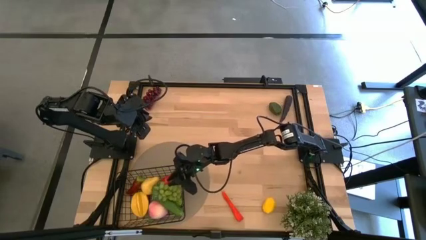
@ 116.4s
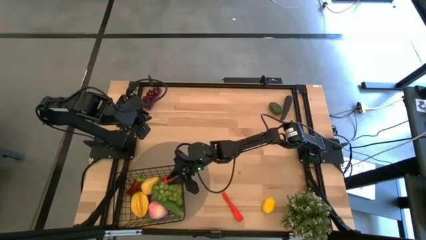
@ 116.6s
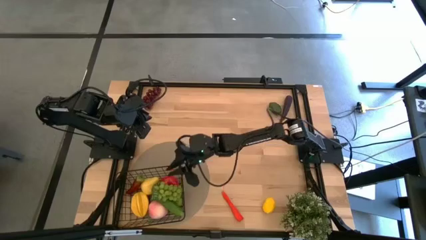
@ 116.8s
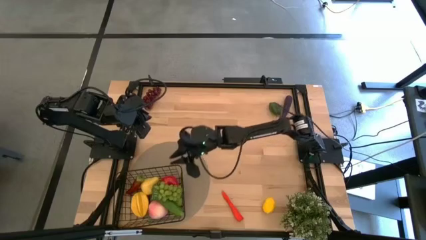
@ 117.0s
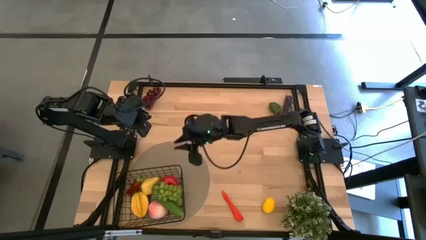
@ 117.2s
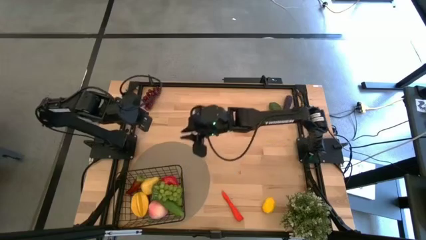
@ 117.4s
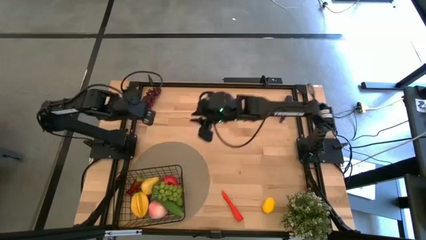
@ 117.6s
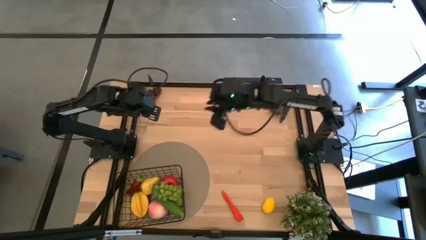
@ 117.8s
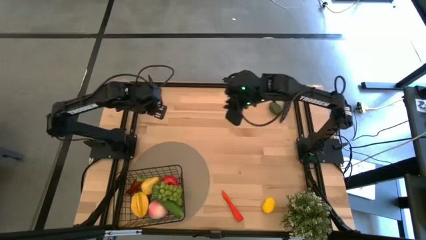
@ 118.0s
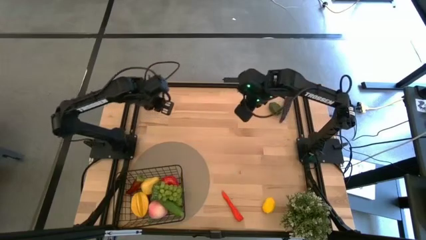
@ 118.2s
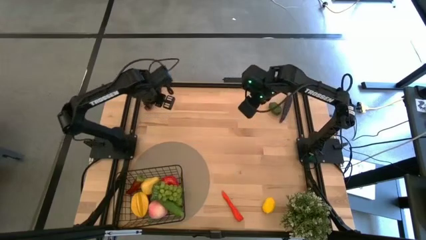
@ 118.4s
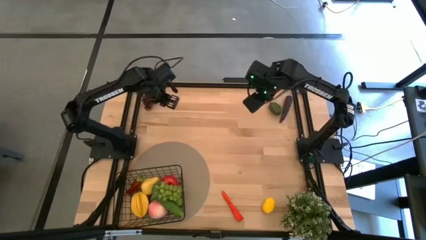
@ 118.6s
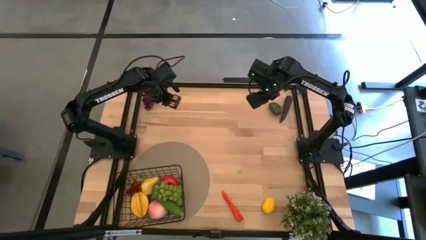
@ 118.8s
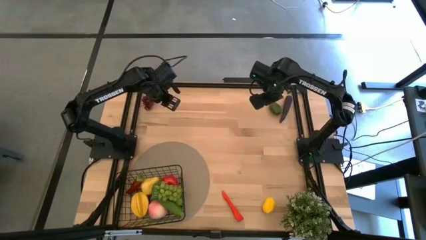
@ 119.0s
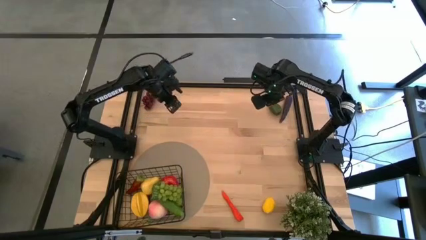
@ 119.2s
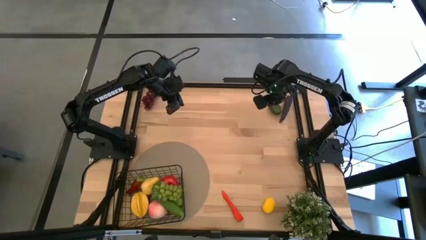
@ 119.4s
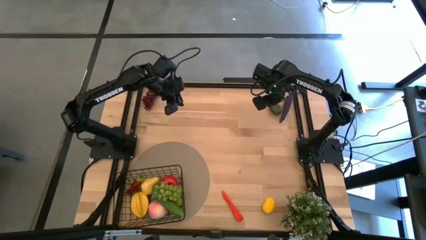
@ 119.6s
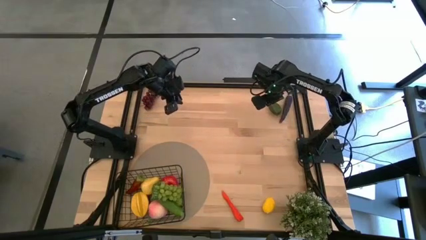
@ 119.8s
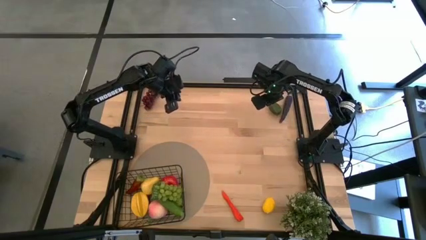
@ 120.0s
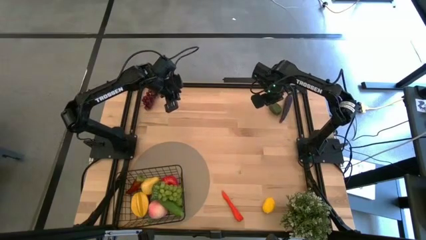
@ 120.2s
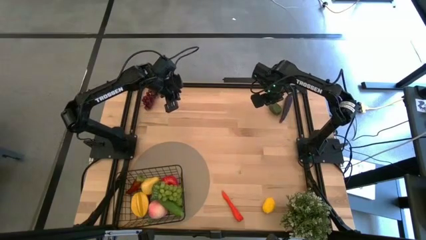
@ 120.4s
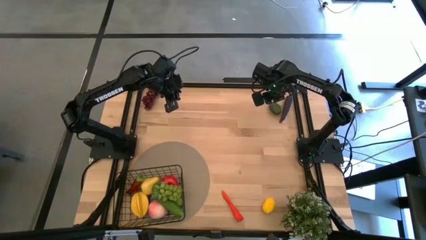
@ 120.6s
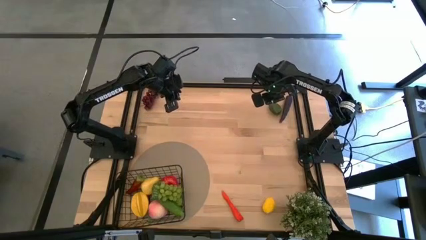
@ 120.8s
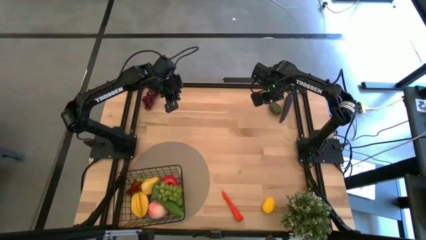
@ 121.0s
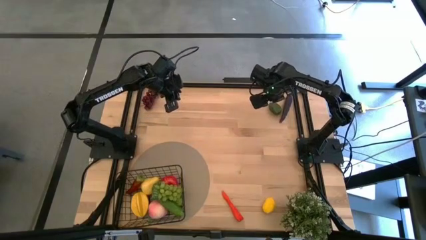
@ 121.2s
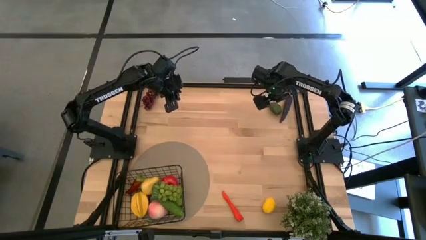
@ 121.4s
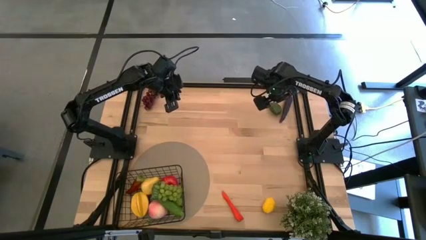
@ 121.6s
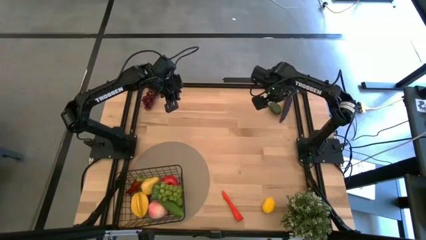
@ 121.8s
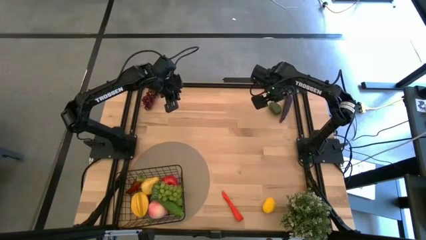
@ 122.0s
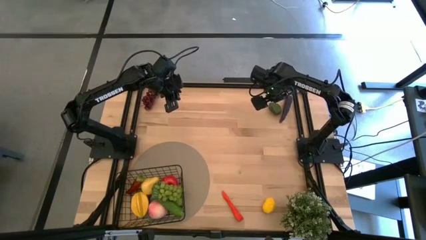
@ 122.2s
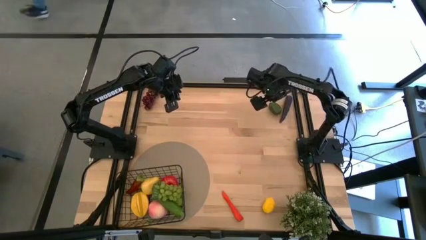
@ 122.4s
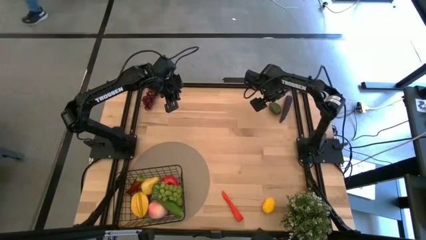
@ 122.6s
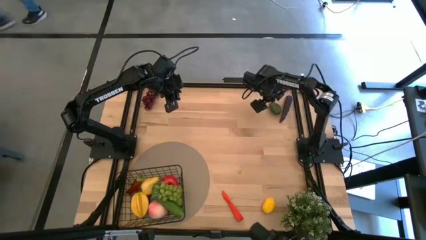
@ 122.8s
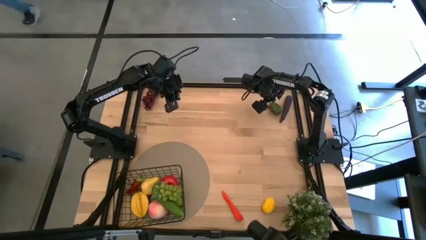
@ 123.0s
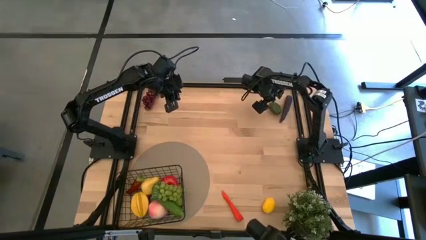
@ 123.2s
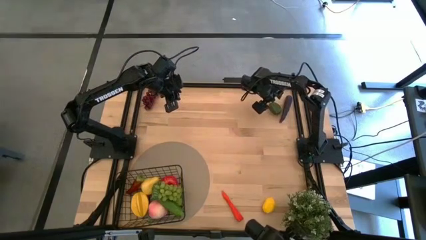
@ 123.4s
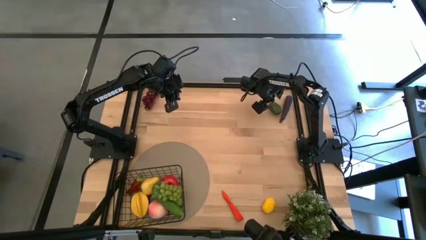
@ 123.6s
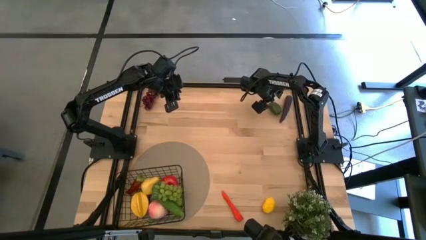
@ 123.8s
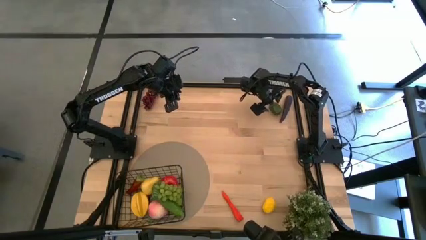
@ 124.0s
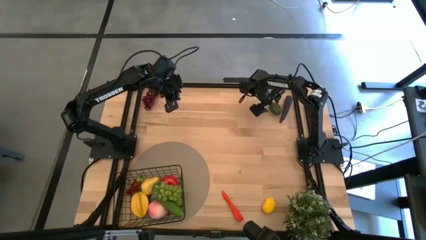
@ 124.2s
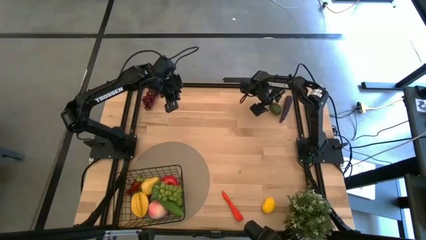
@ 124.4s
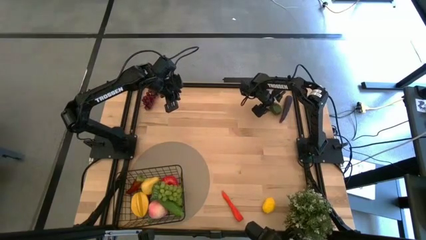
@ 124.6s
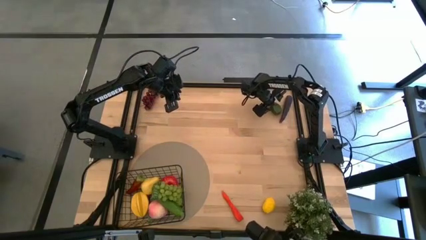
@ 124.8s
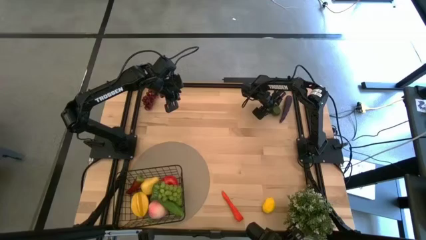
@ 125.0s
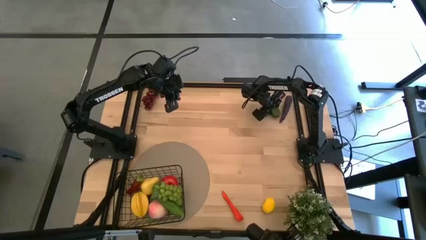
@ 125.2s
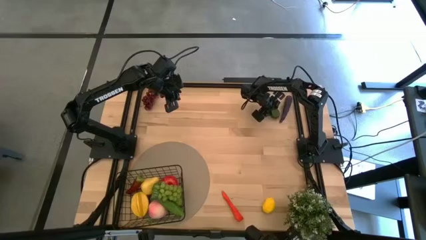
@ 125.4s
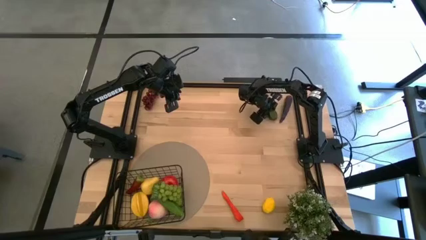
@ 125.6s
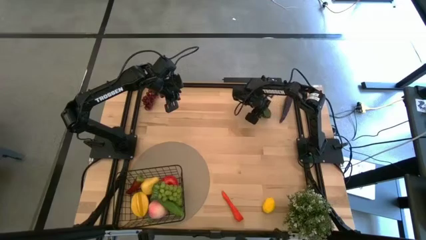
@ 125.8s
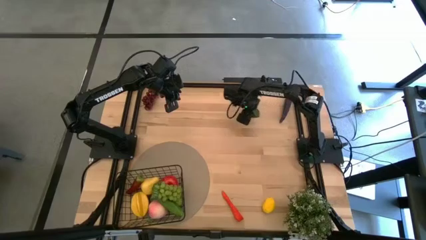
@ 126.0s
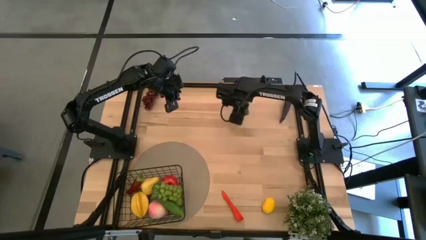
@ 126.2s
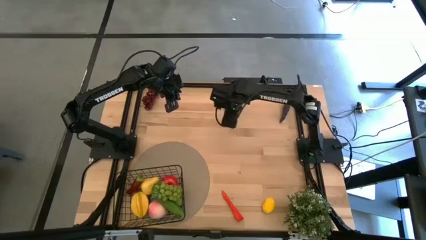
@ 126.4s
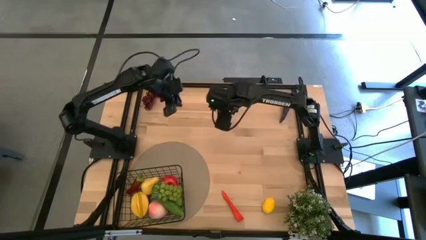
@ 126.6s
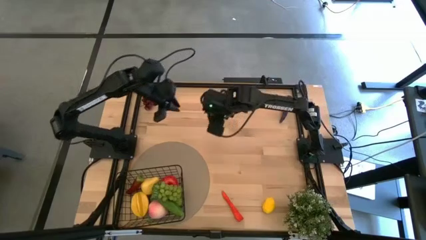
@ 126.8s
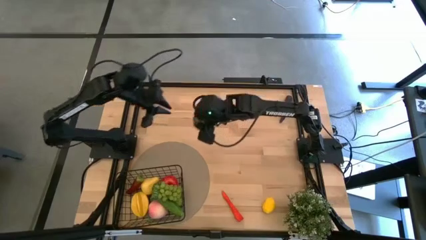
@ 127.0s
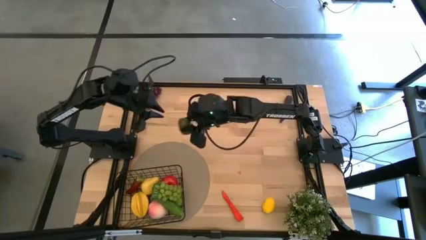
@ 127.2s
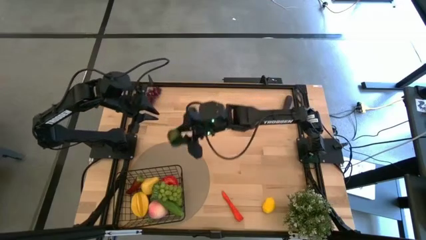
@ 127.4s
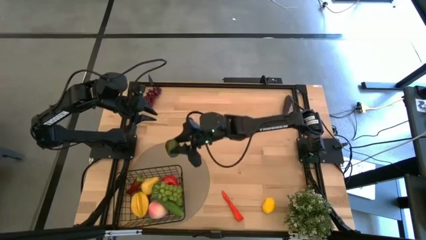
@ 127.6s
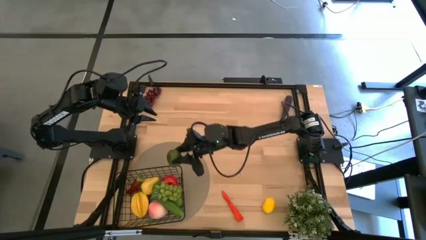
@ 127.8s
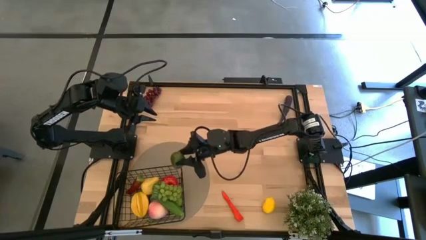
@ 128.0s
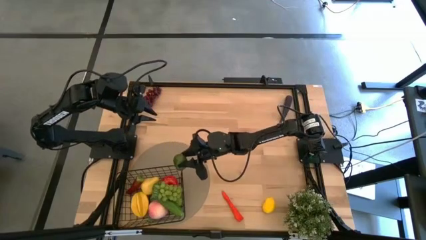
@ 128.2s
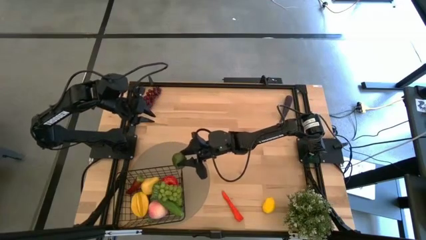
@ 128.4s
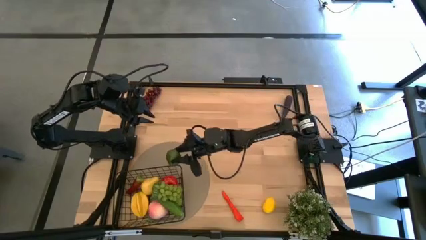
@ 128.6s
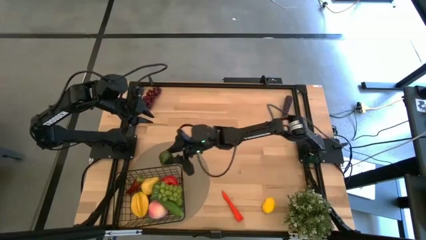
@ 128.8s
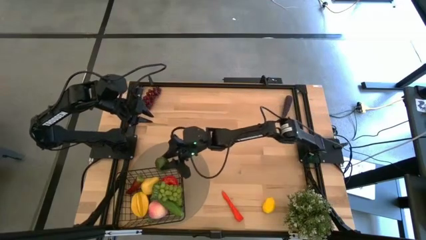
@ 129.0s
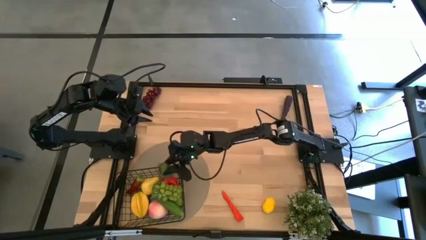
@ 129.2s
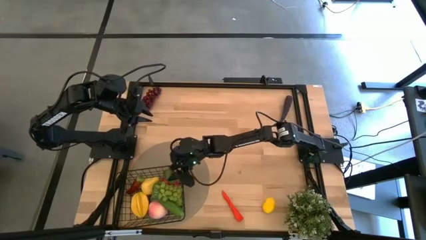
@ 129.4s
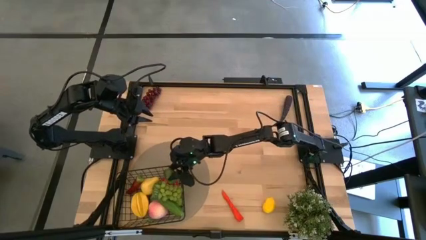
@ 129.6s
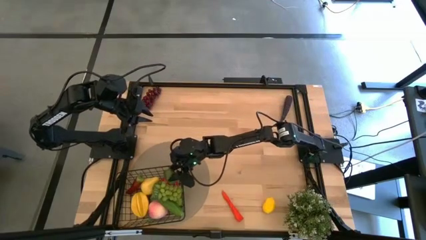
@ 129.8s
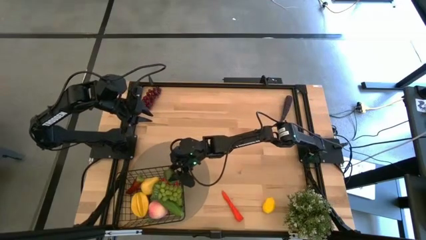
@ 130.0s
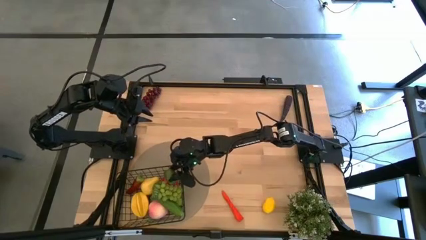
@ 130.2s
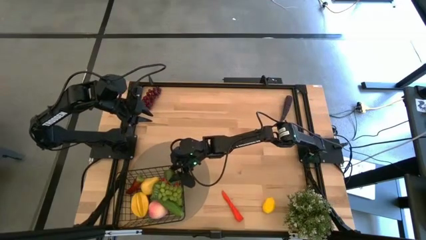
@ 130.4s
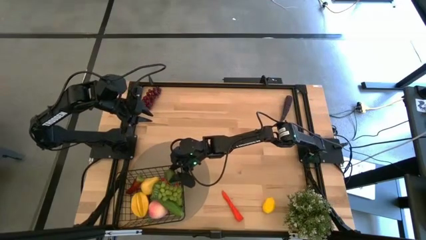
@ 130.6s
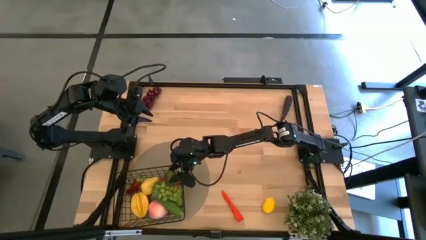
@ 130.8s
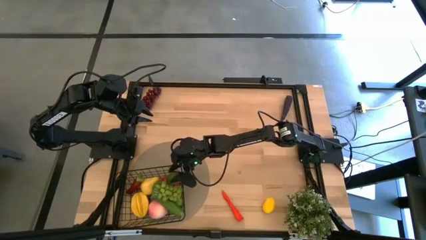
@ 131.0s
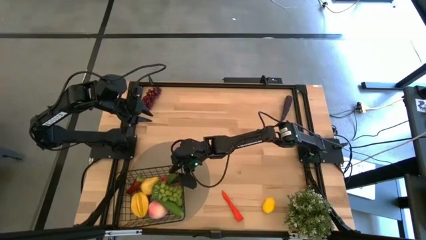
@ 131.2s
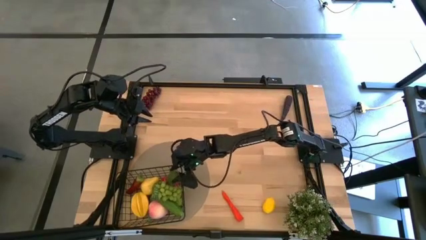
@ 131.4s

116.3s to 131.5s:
Task: Build produce basket
Put the green lime into the wire basket
